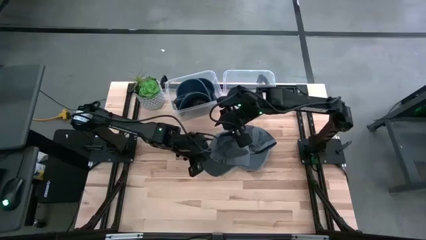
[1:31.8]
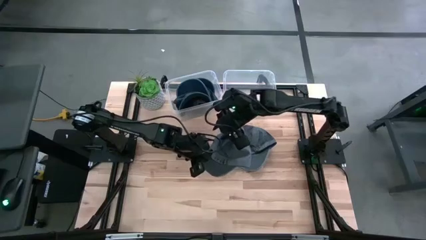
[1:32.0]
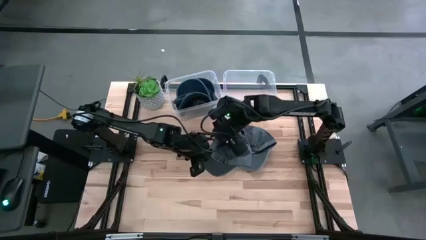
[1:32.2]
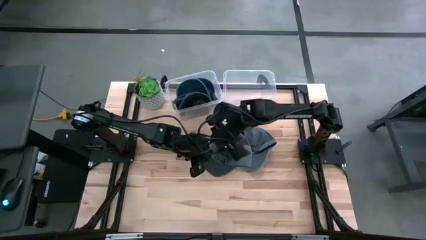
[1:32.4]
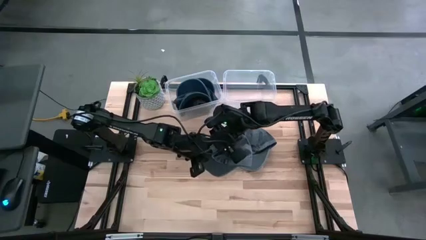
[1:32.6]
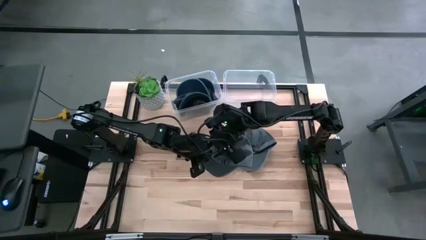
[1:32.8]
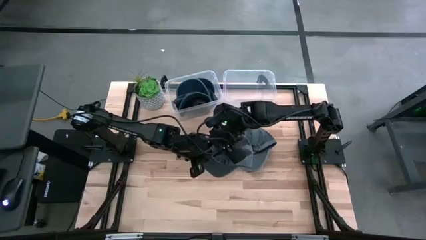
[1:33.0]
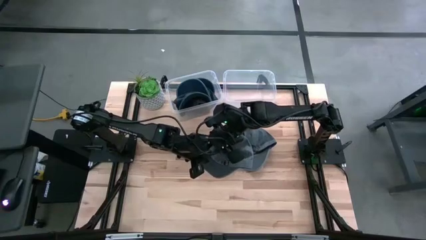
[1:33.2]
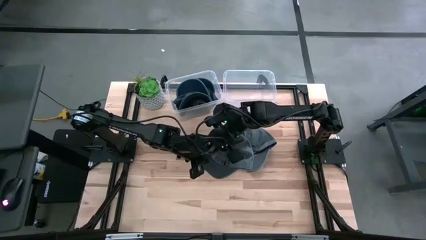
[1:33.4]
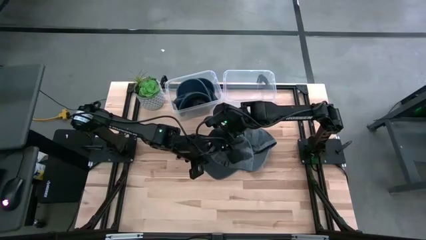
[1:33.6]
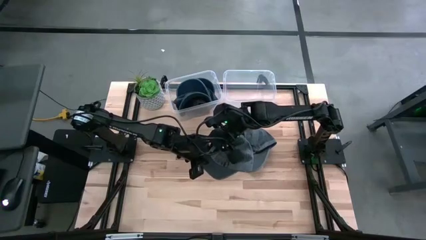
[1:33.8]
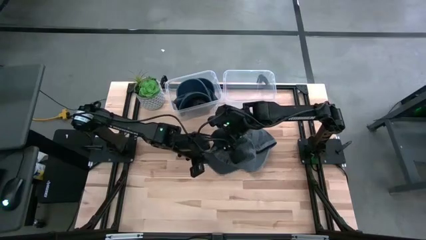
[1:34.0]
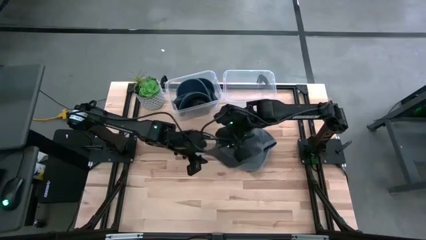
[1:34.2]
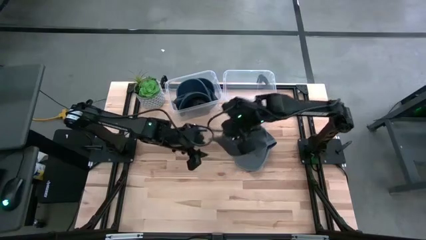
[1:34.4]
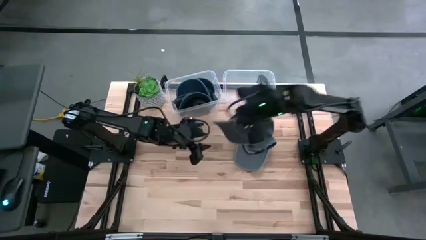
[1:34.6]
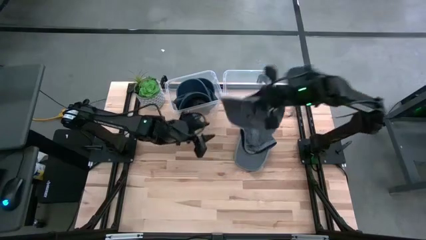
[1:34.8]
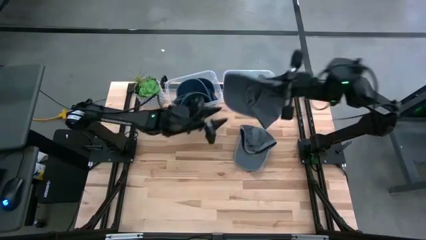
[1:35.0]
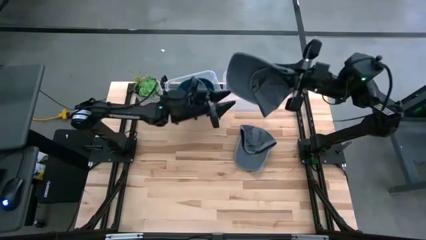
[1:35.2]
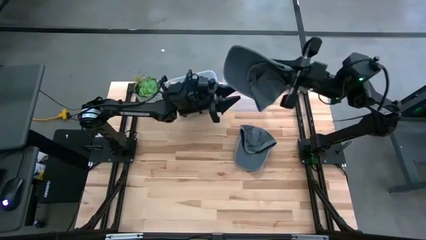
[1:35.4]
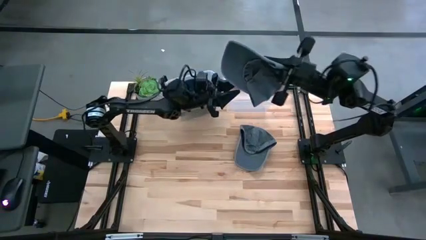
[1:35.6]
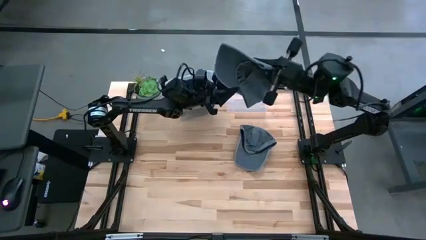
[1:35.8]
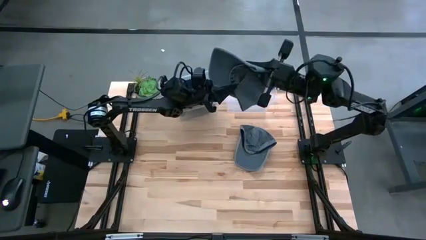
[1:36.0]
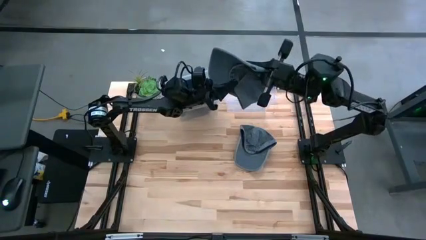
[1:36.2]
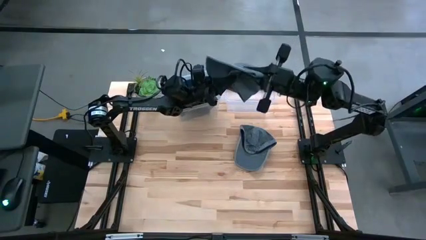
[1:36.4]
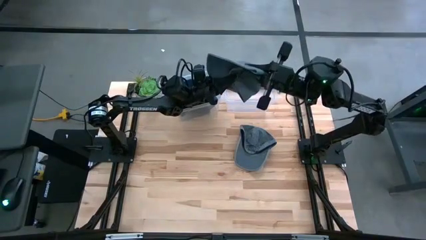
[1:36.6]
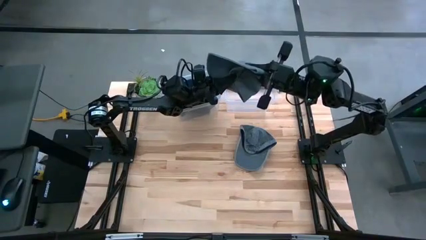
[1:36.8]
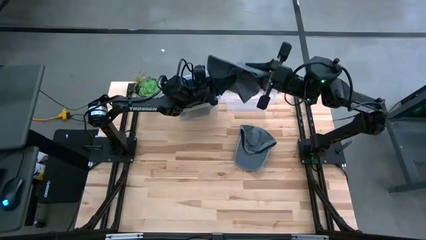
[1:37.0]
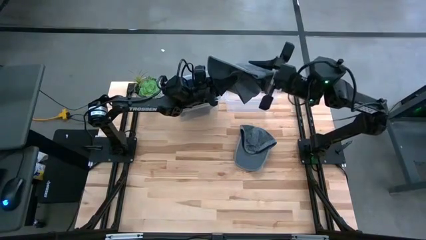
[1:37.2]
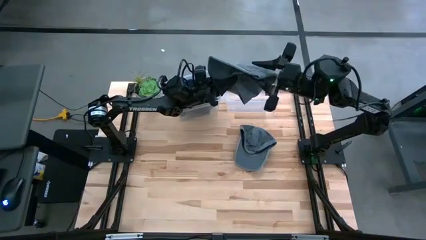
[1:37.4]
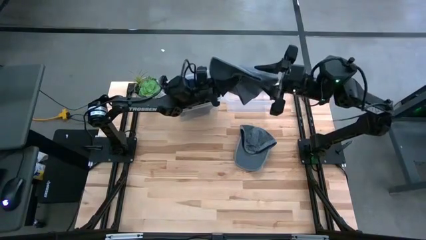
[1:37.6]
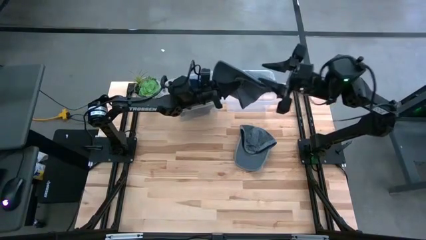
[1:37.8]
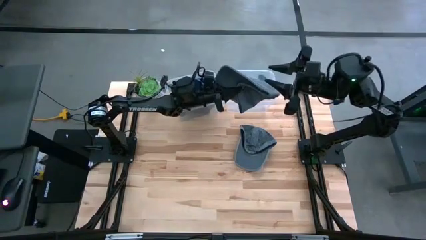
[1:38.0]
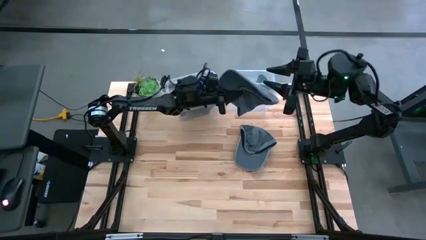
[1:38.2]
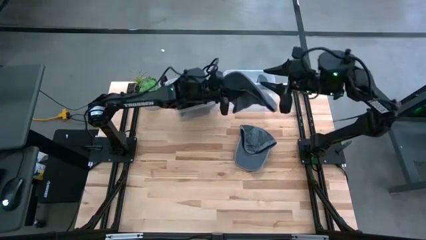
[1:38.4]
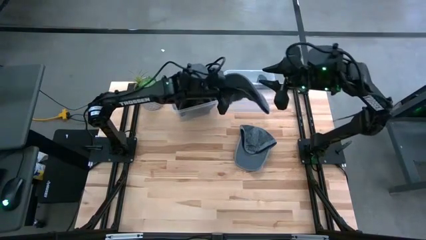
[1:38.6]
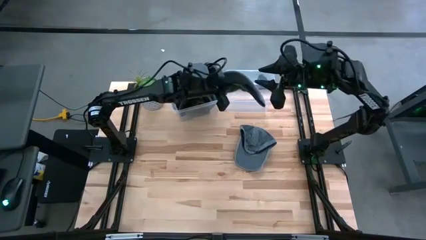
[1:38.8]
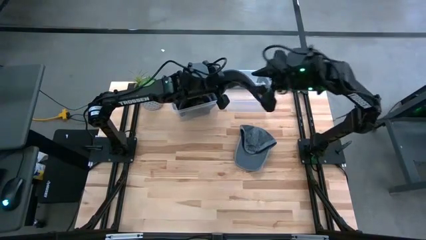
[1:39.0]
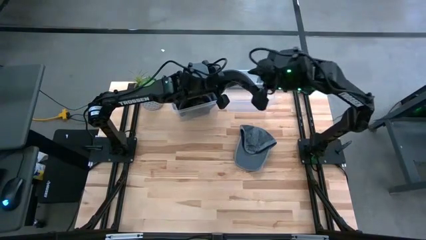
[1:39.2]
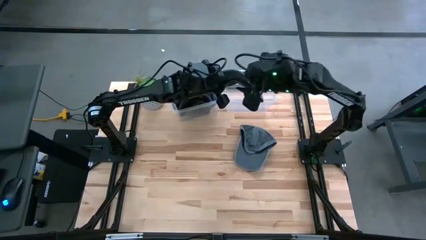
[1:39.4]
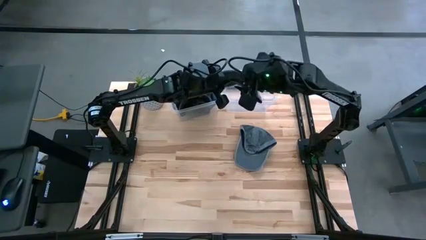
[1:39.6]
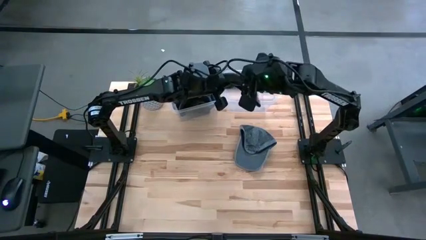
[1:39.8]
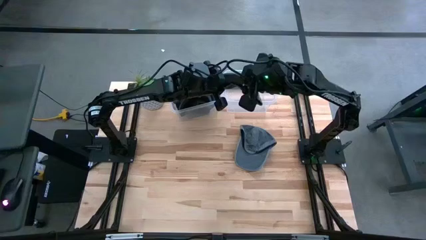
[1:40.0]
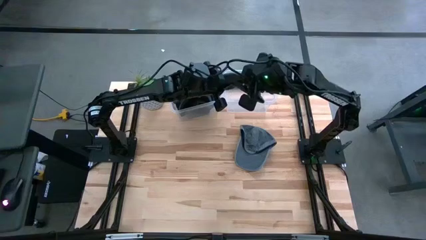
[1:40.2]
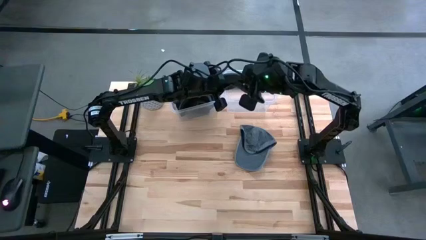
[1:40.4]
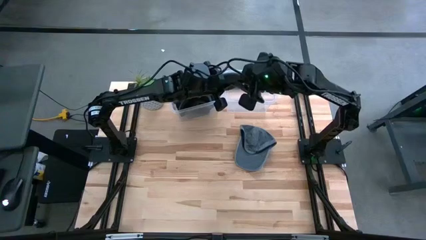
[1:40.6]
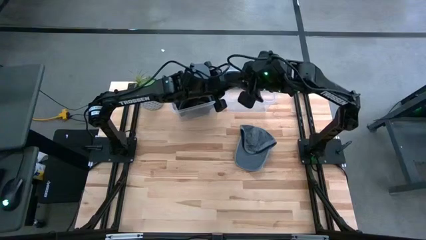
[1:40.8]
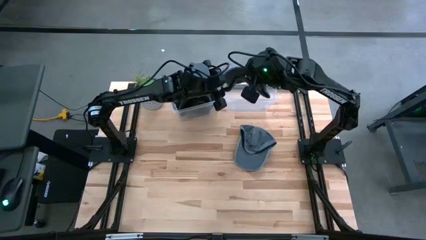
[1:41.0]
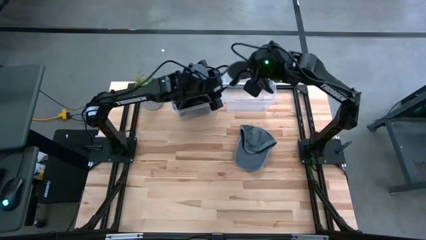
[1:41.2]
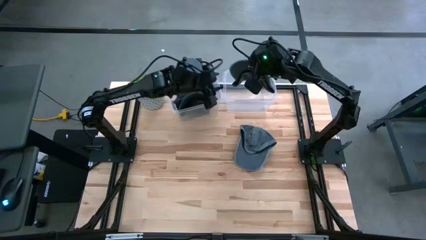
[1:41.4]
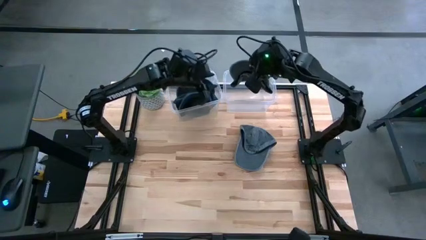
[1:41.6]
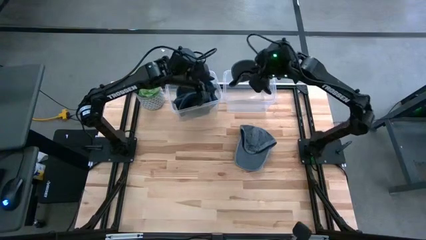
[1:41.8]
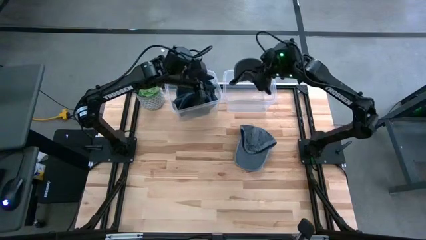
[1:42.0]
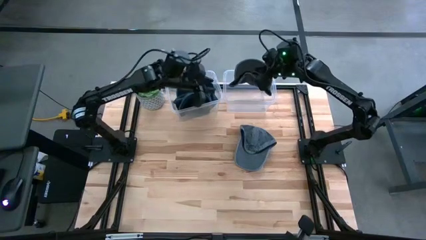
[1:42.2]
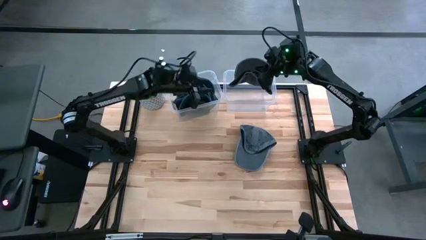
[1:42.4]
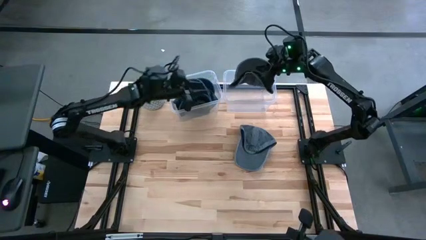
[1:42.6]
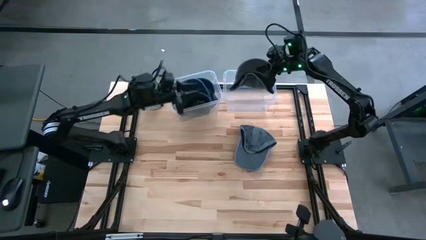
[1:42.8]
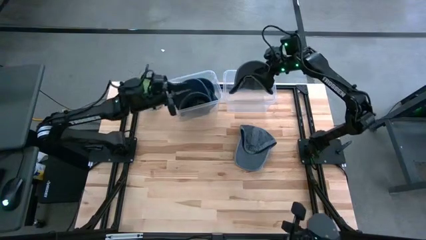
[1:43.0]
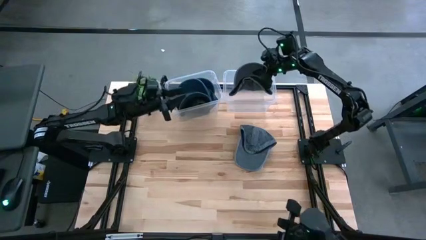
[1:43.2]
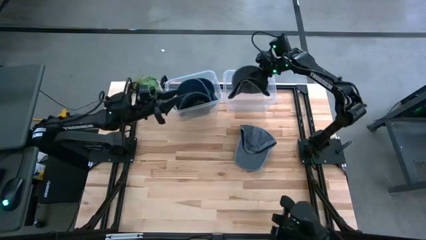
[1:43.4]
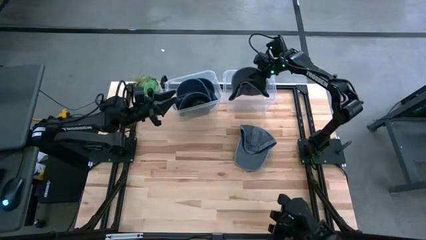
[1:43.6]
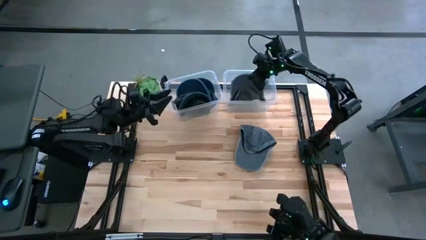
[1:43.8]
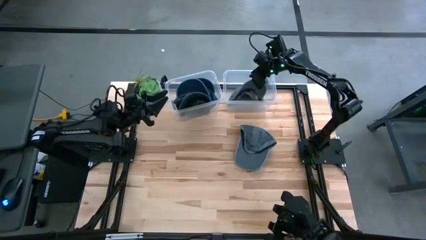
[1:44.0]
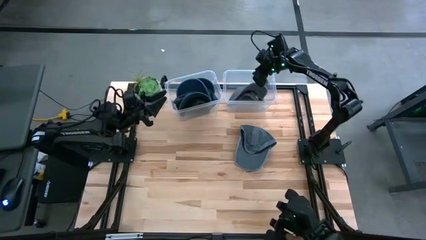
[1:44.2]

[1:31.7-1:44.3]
Task: Pick & Place hat
Put the left gray cap into the right transparent bin

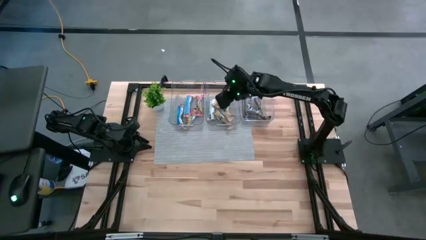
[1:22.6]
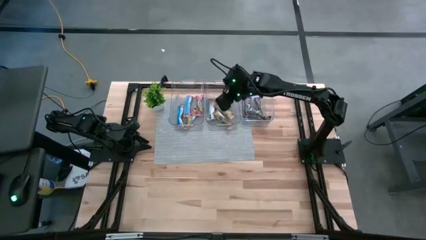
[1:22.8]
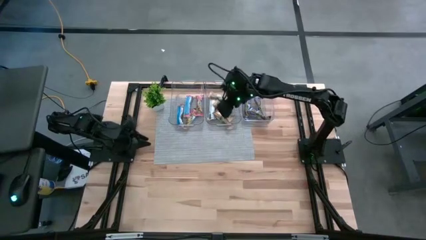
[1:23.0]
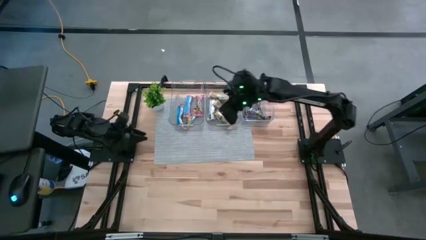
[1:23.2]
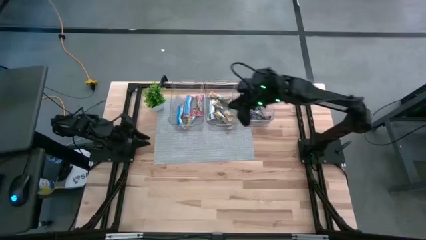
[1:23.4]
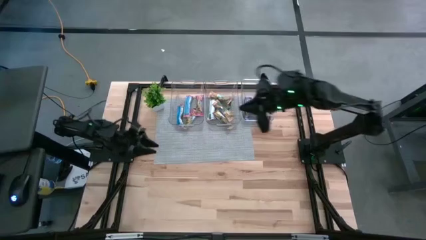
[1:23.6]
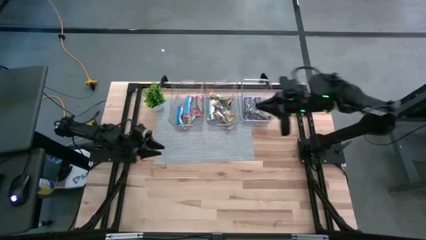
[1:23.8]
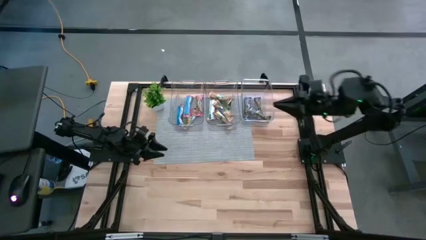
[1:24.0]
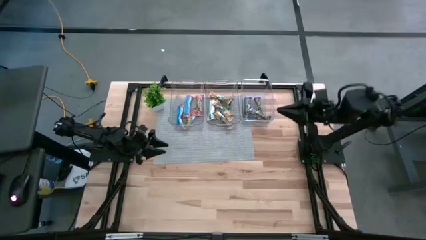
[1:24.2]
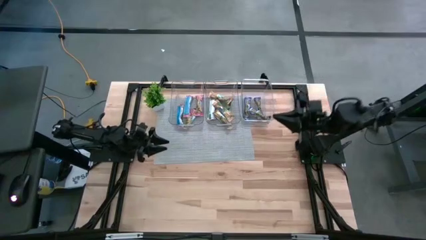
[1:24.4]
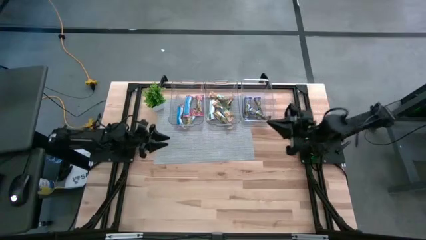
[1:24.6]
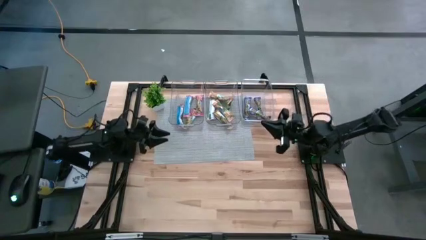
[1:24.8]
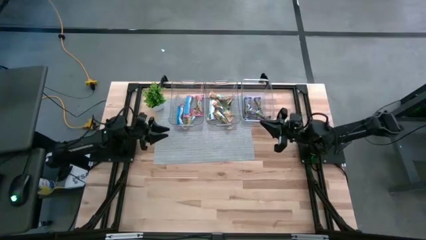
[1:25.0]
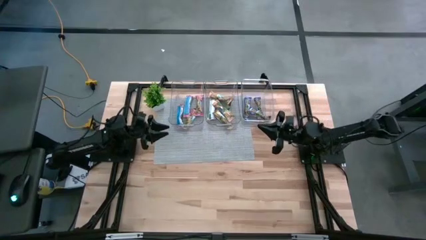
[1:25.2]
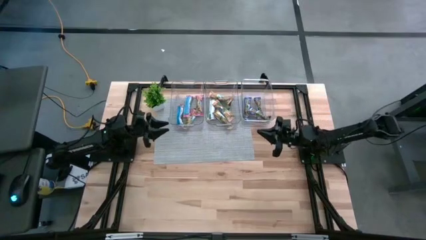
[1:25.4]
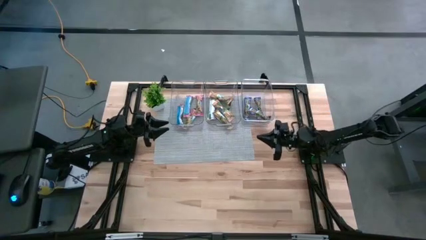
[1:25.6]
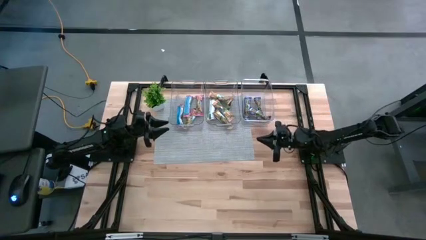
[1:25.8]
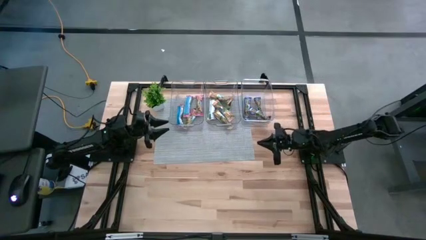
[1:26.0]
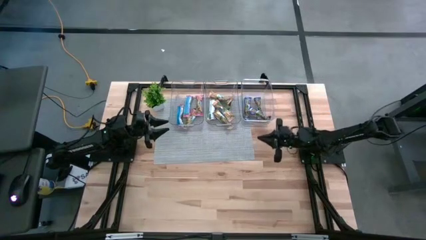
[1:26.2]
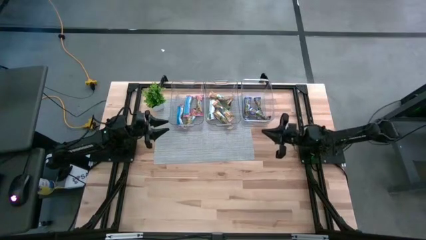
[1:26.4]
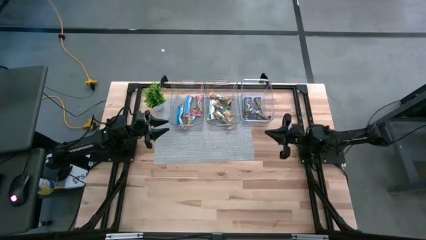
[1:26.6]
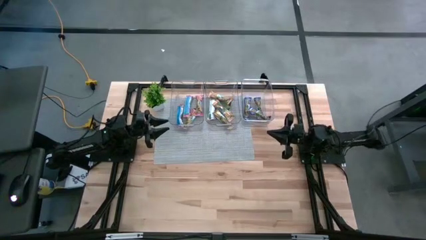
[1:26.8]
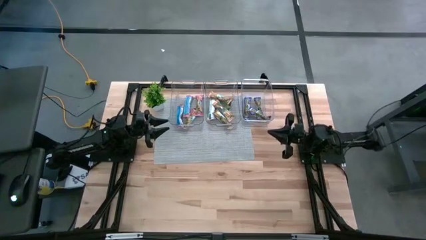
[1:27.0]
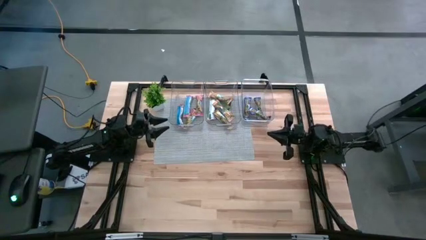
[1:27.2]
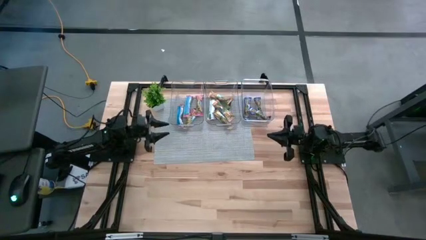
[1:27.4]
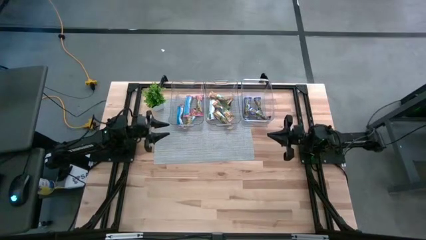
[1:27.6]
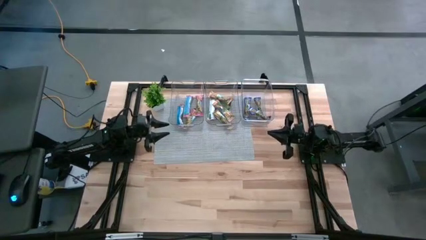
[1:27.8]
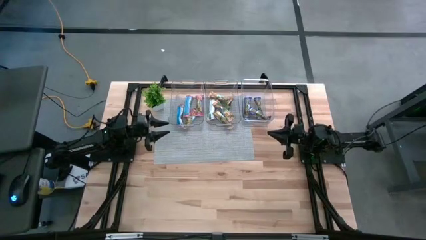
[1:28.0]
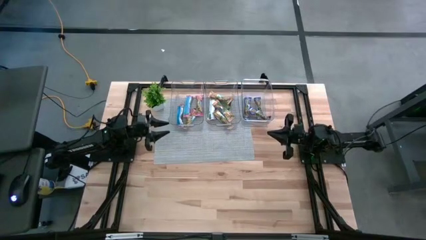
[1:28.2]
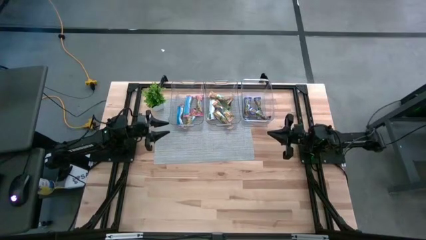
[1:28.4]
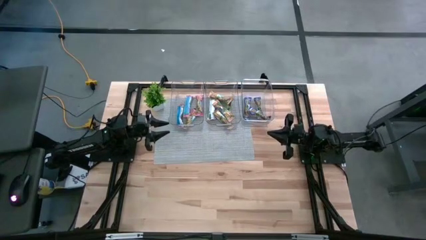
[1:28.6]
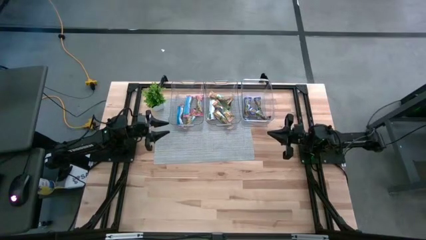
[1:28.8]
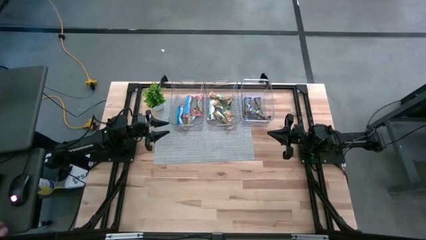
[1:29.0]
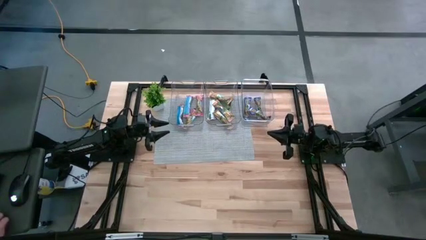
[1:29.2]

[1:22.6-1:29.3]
Task: Pick and place Granola Bars by type
Return to Home Position
